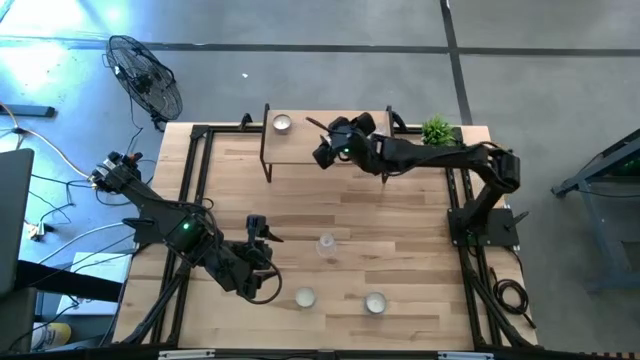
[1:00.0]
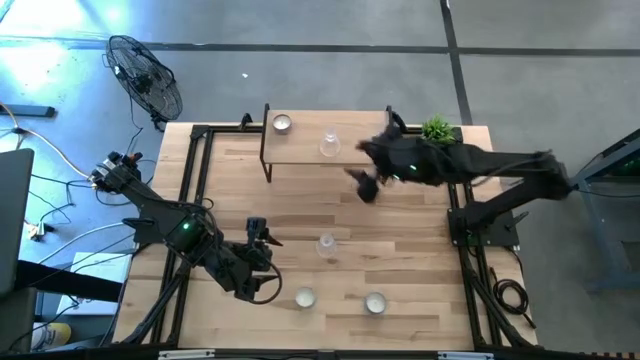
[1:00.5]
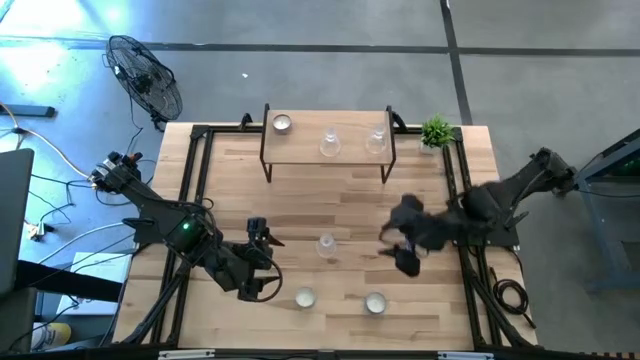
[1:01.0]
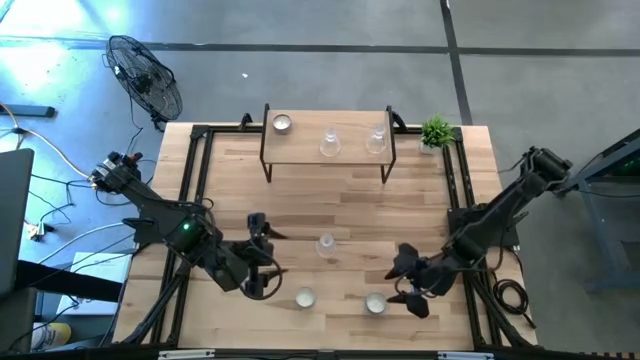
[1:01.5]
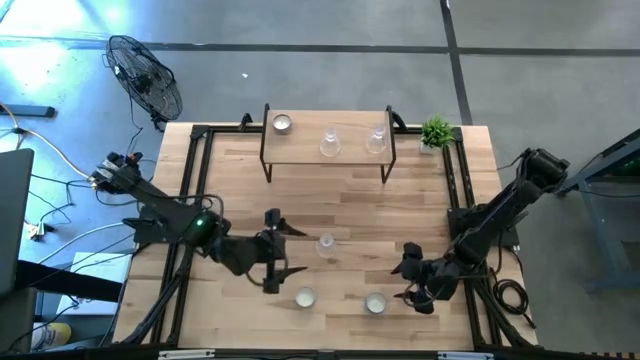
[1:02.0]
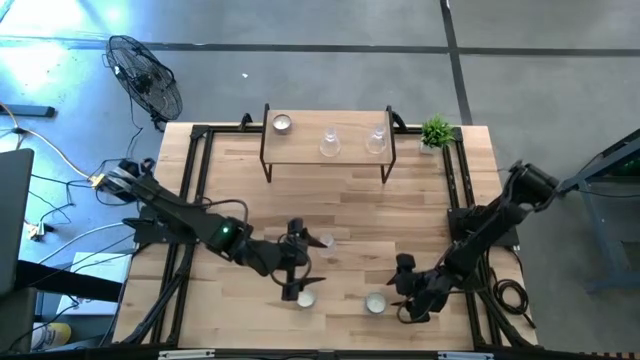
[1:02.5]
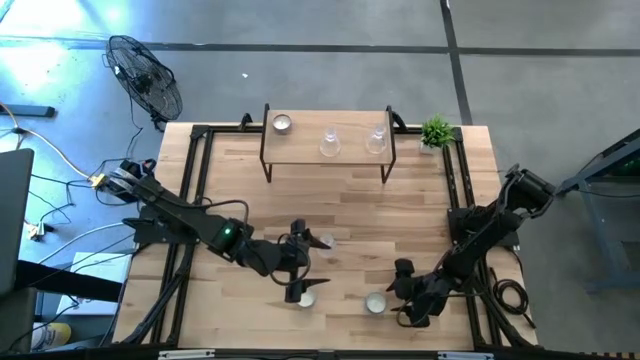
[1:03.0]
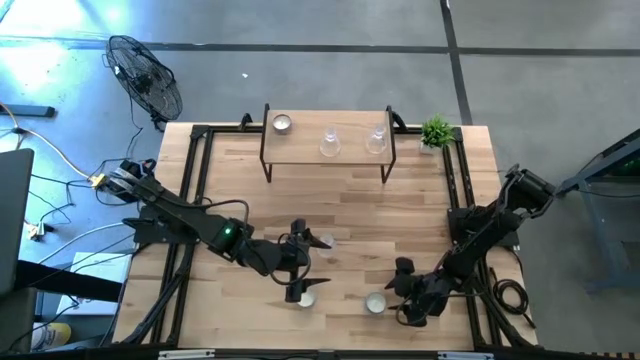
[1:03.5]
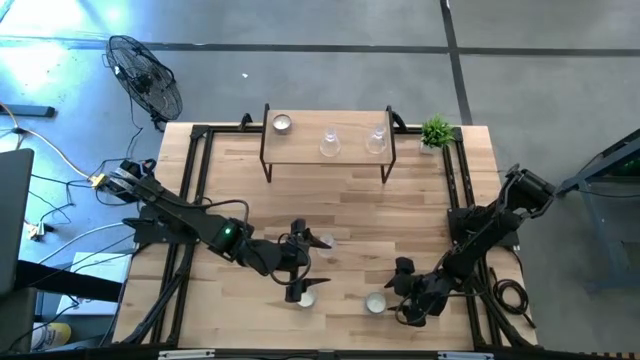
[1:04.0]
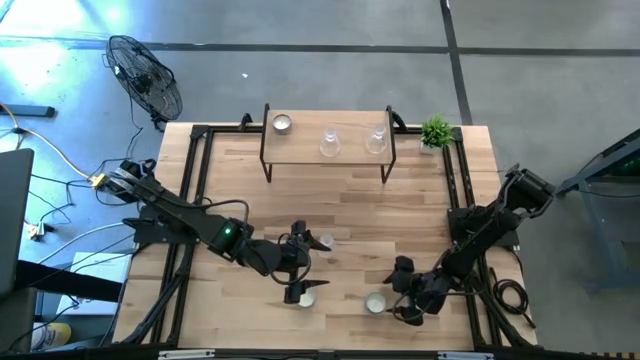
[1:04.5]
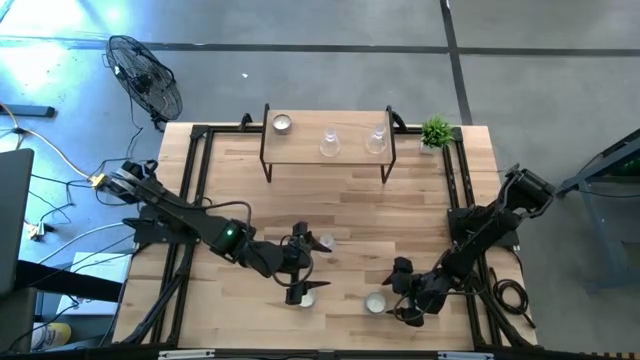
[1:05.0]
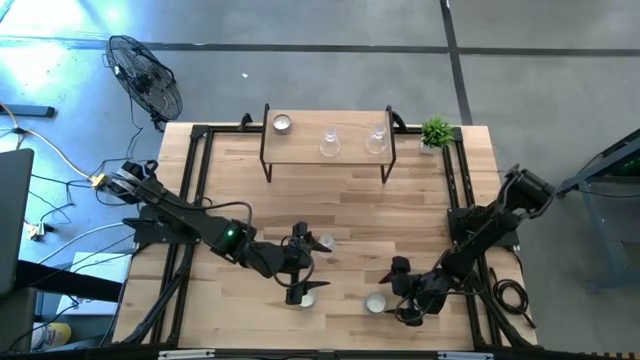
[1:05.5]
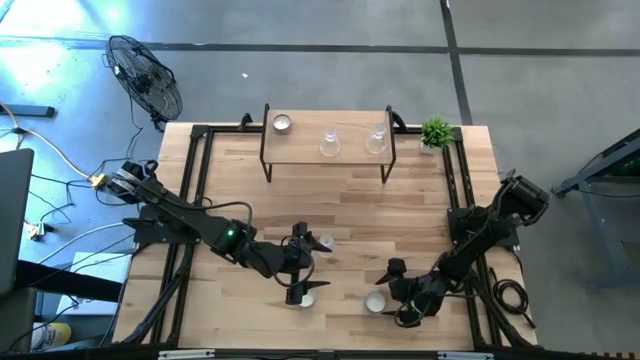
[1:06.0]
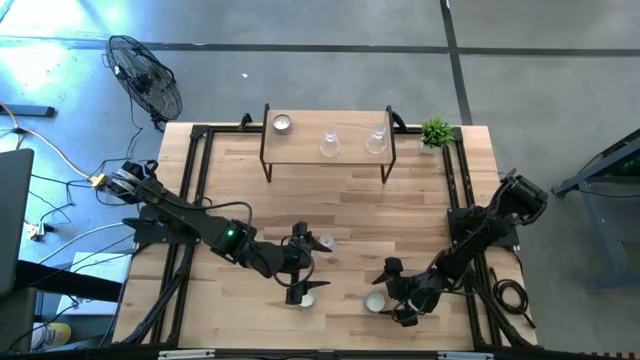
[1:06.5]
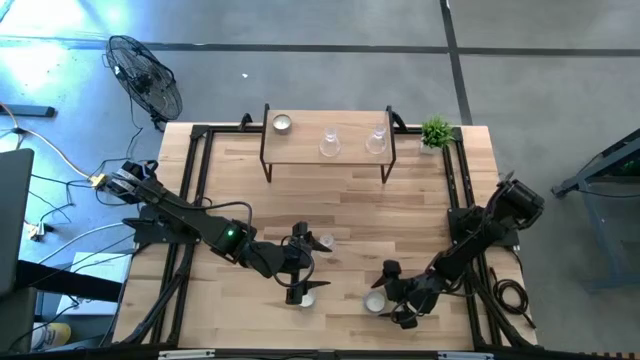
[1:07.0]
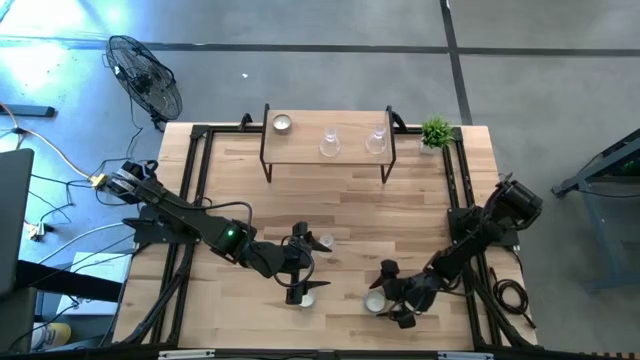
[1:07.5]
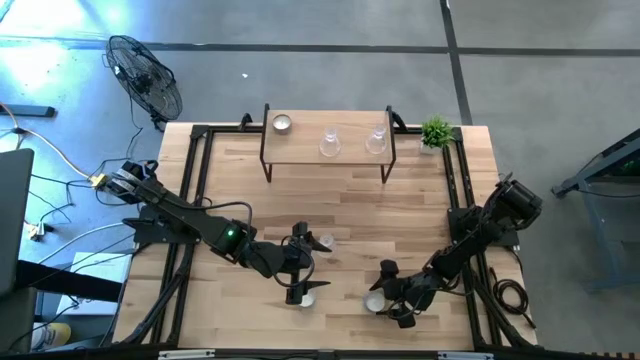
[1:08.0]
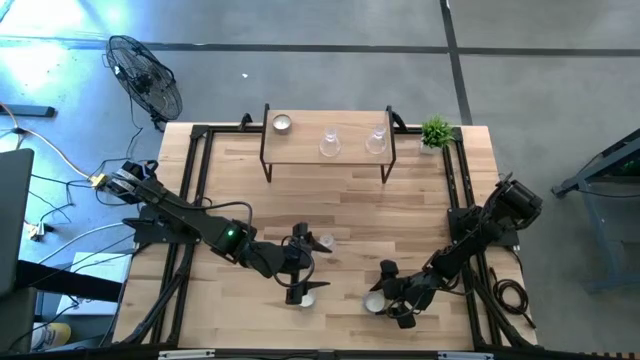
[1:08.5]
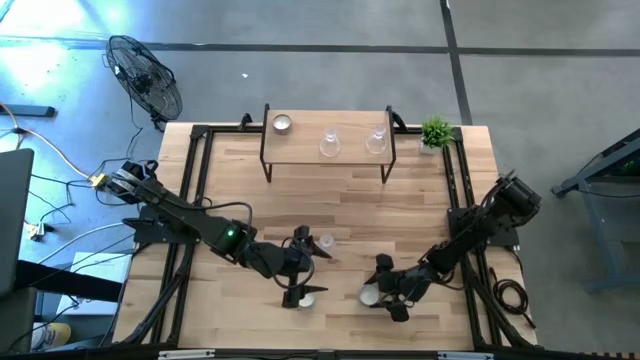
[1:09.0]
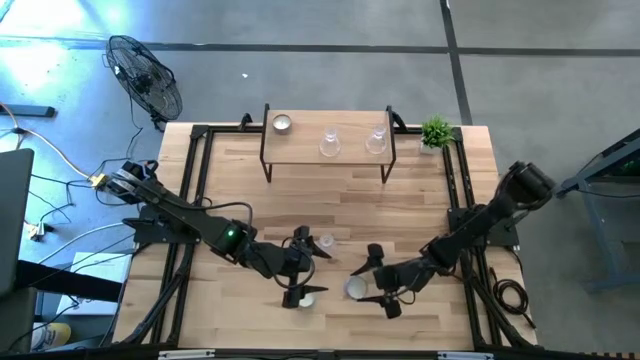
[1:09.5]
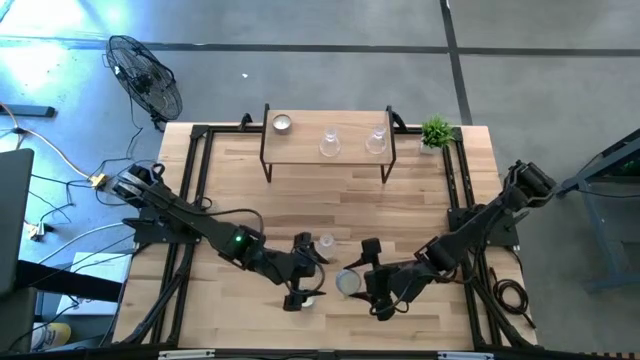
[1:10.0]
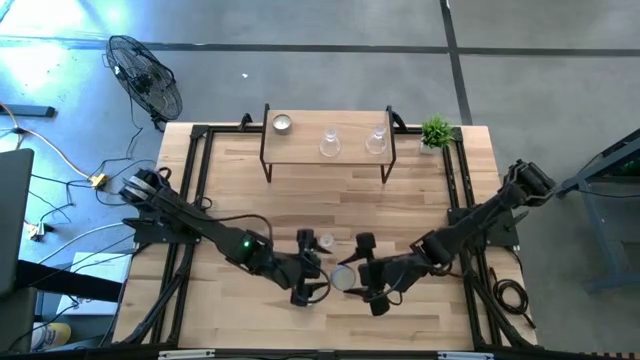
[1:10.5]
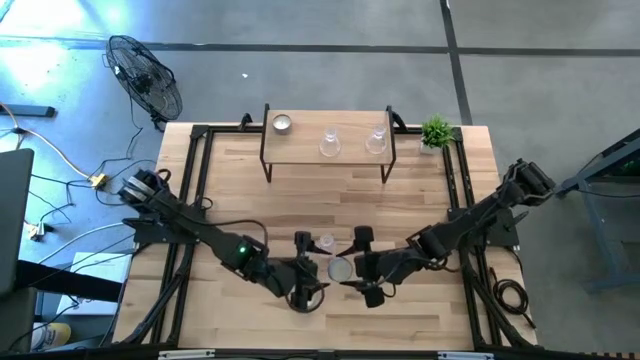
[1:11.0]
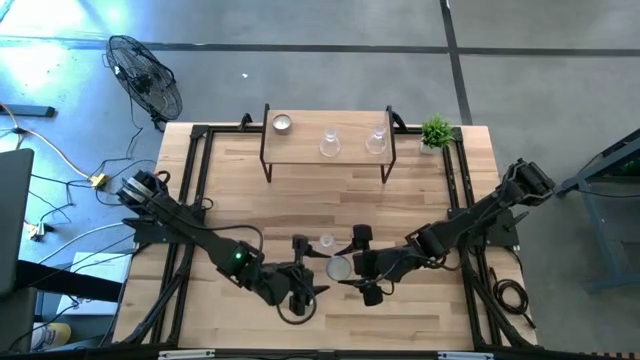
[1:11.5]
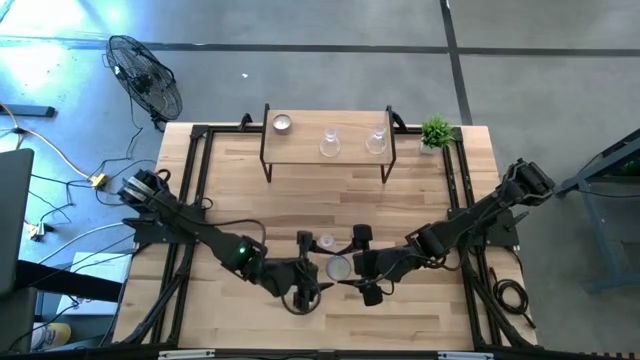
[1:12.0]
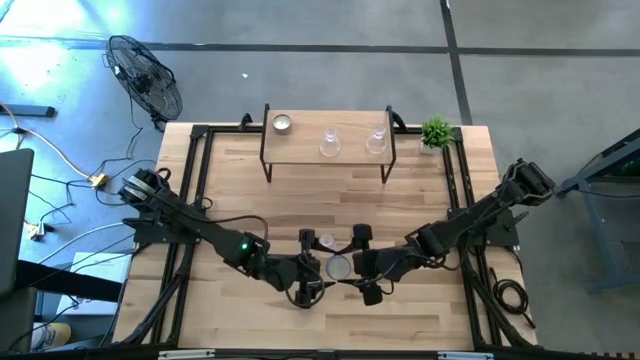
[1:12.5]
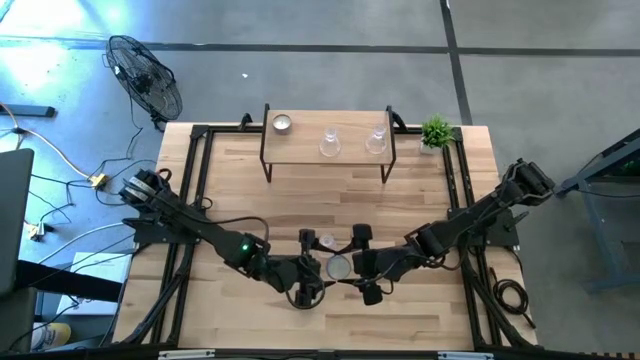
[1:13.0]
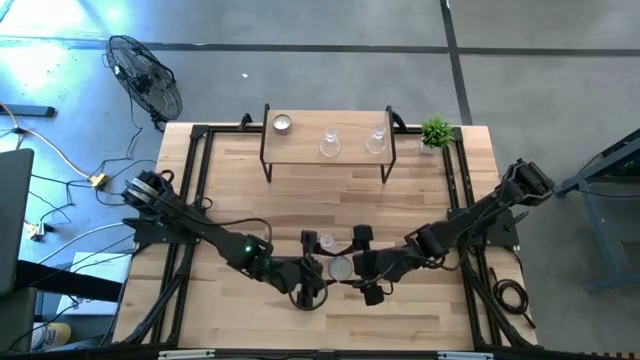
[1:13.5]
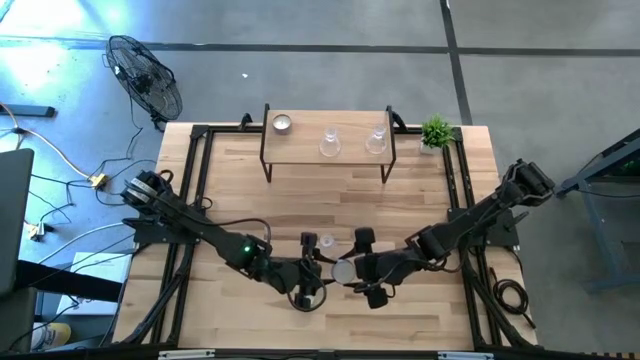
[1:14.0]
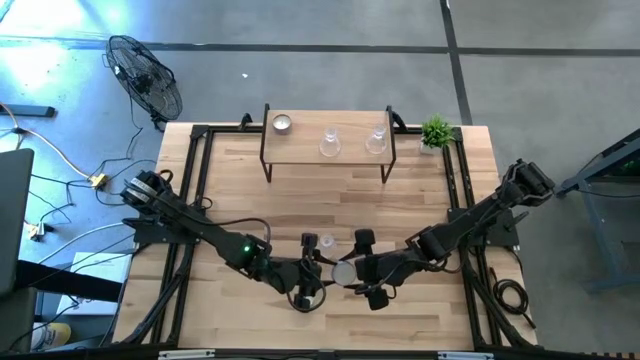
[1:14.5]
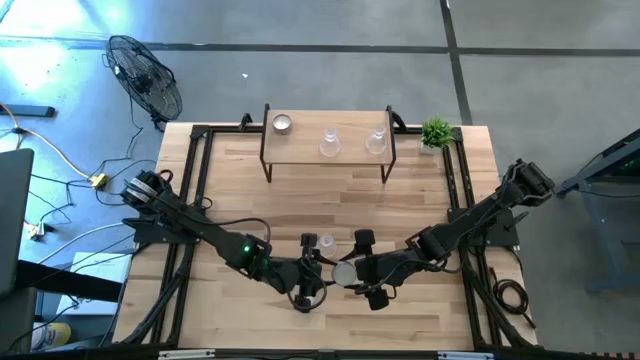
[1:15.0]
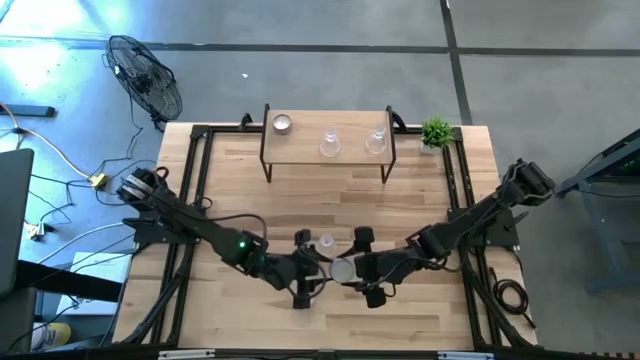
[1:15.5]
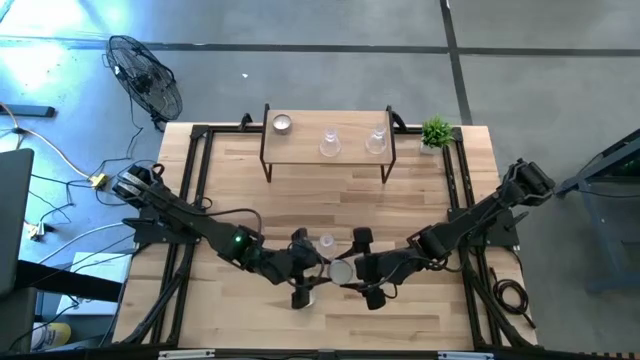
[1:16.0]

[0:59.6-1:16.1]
Task: Pick & Place candle stick holders
Put the blue patterned scented candle on the shelf

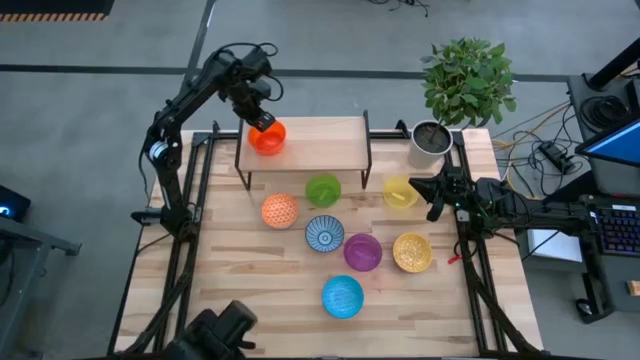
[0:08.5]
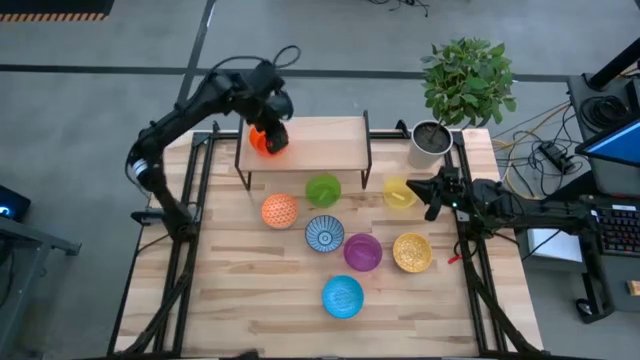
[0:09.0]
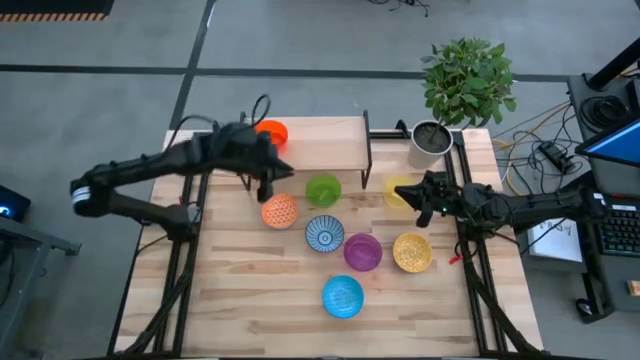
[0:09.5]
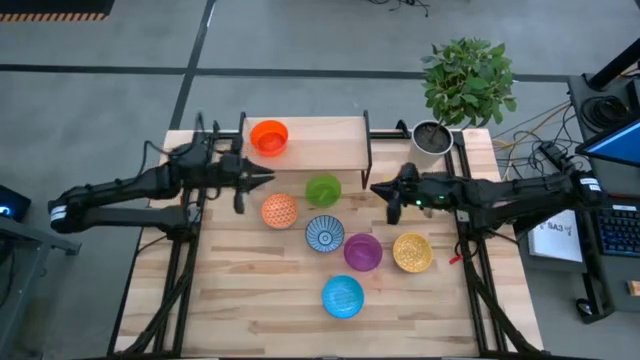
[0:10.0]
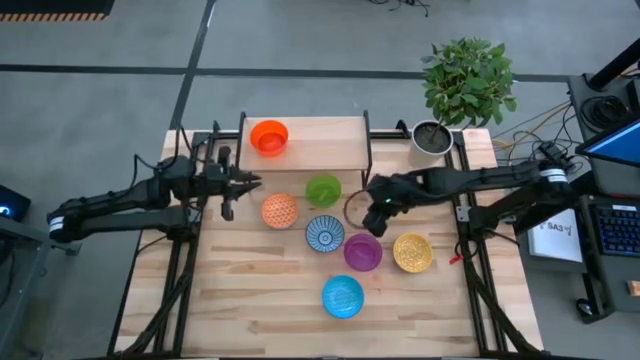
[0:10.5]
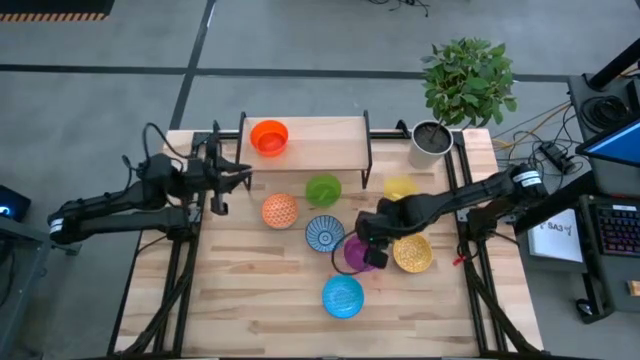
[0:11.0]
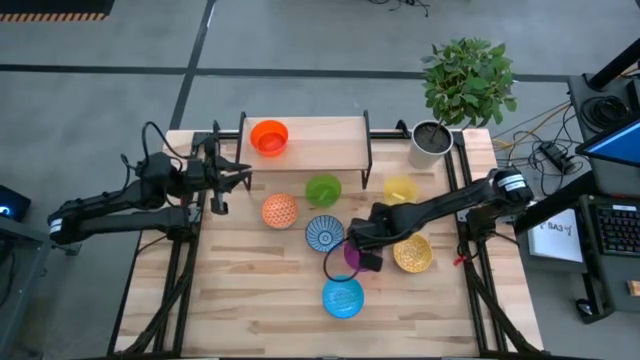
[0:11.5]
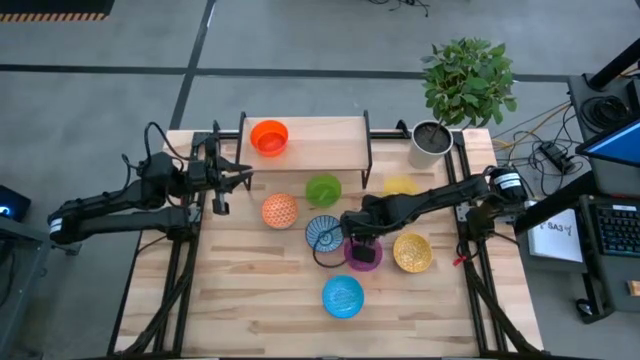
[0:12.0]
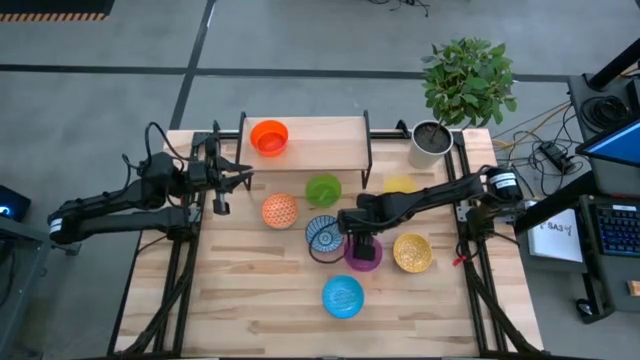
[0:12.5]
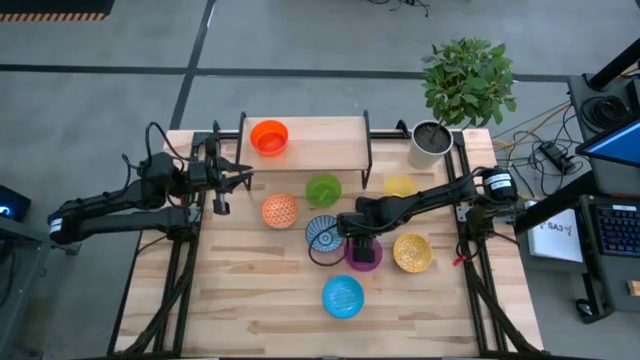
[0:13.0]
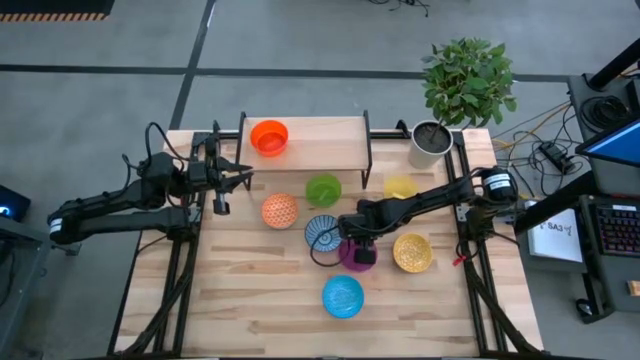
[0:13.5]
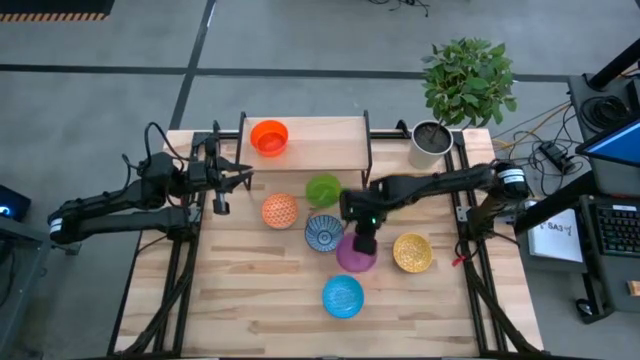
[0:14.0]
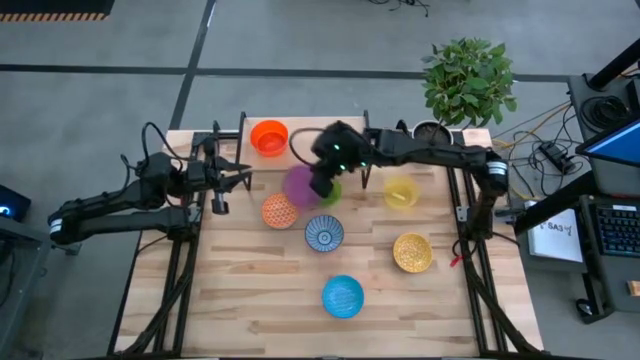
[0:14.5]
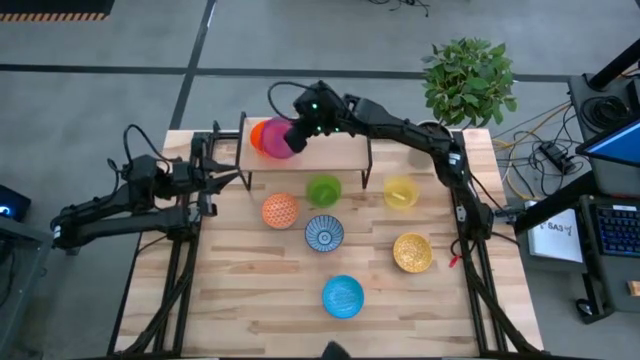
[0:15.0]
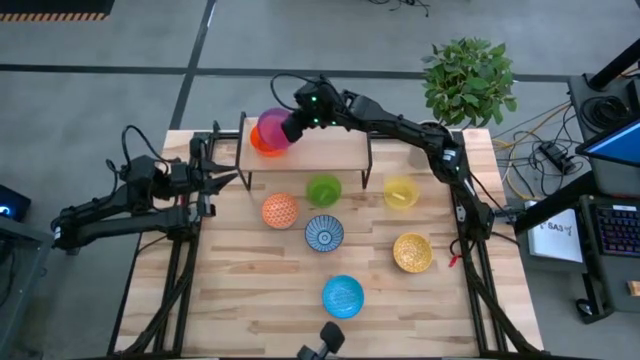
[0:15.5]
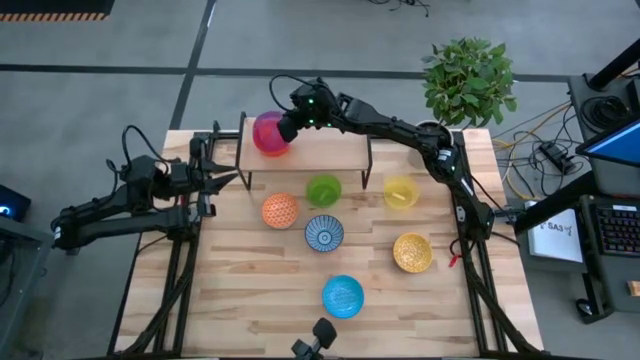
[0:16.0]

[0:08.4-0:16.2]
Task: Place and stack bowls onto a shelf
Stack the transparent violet bowl on top of the transparent orange bowl on the shelf
